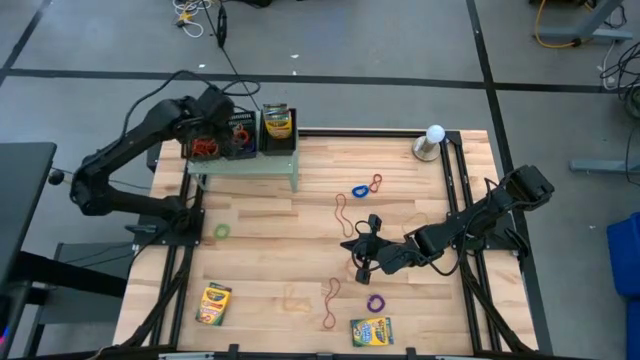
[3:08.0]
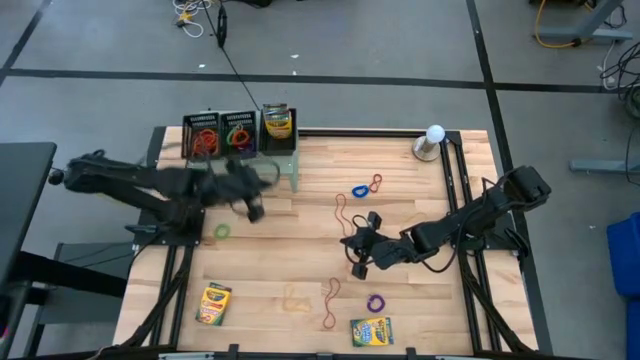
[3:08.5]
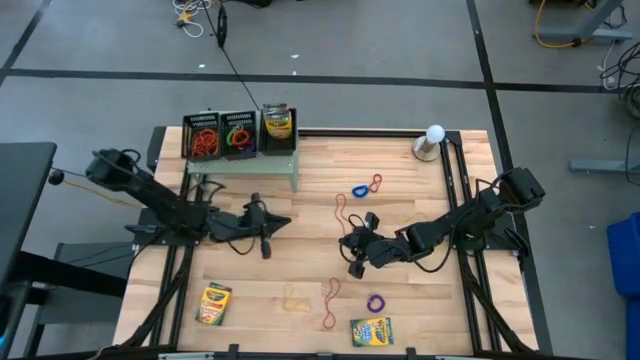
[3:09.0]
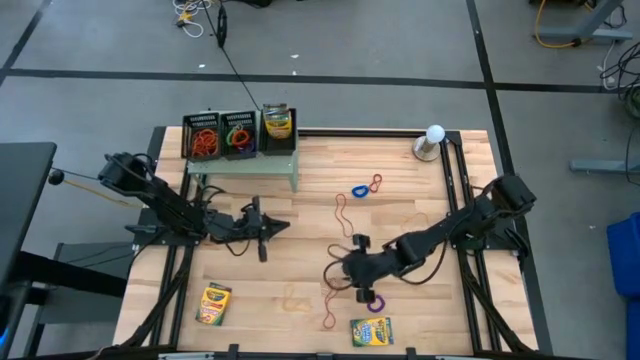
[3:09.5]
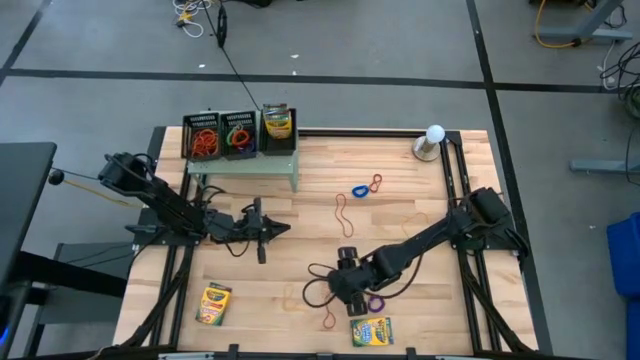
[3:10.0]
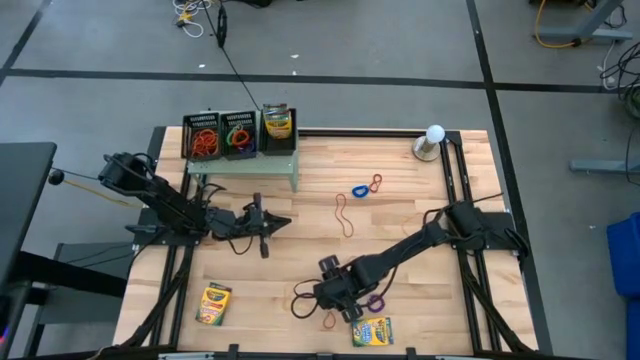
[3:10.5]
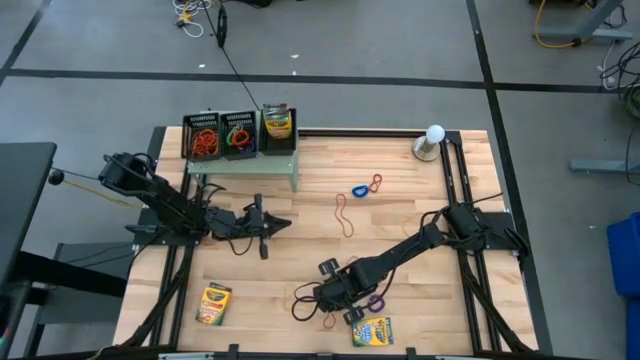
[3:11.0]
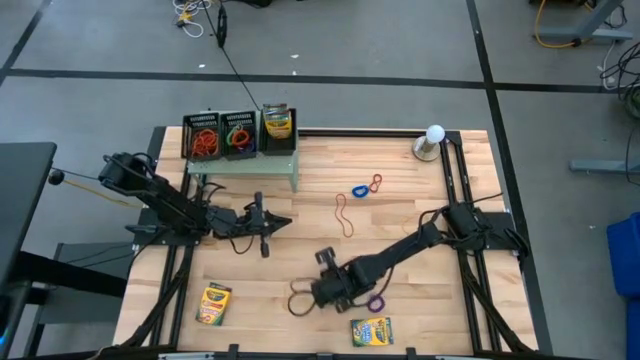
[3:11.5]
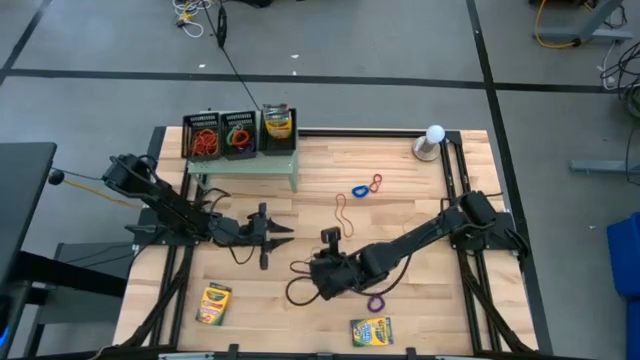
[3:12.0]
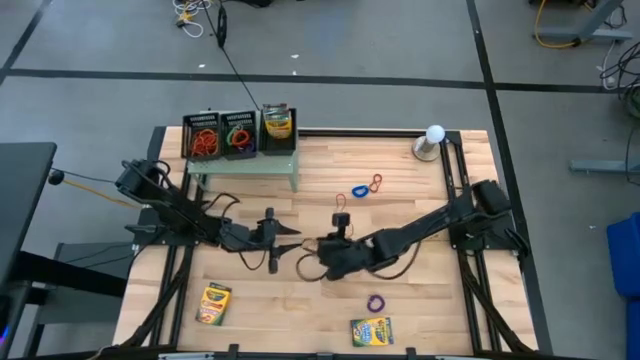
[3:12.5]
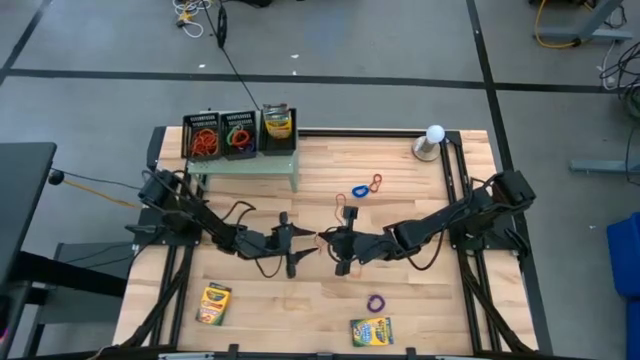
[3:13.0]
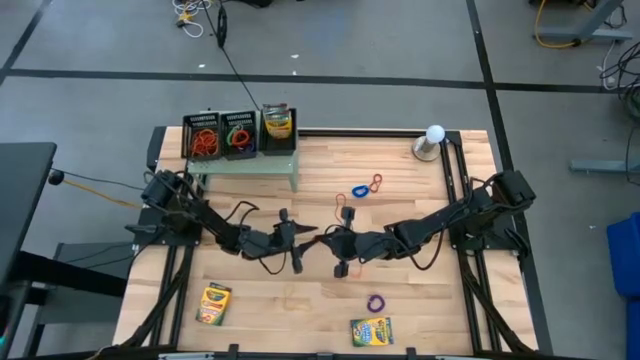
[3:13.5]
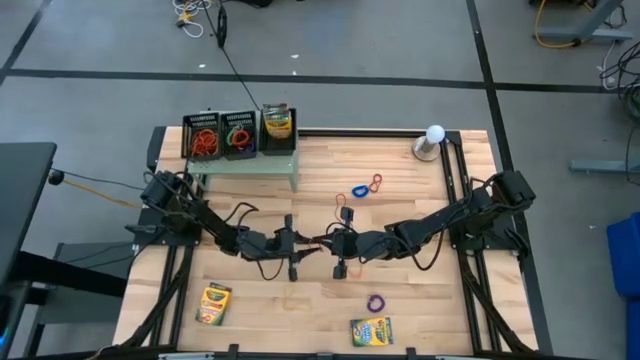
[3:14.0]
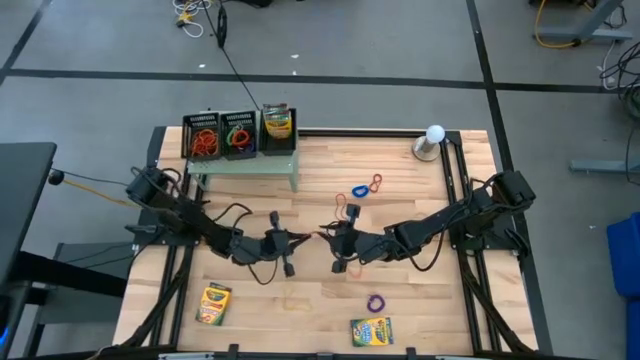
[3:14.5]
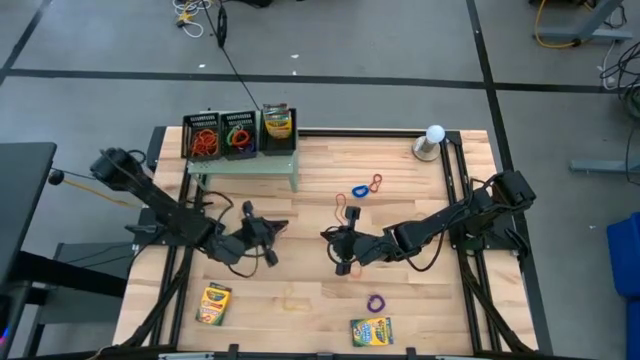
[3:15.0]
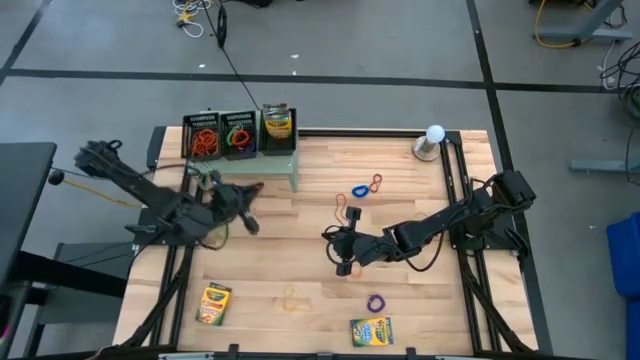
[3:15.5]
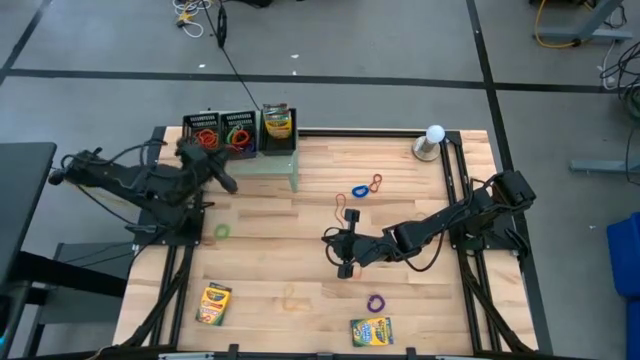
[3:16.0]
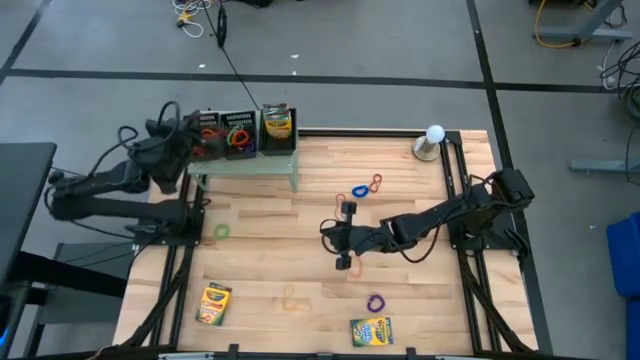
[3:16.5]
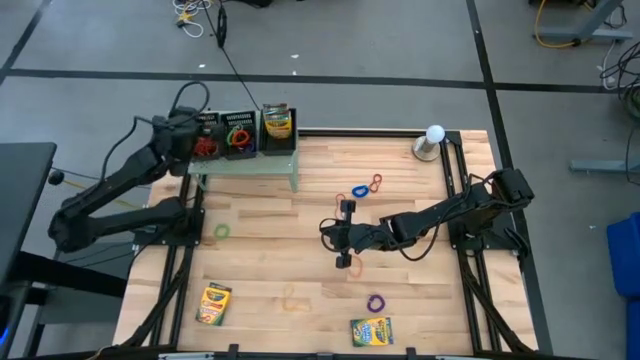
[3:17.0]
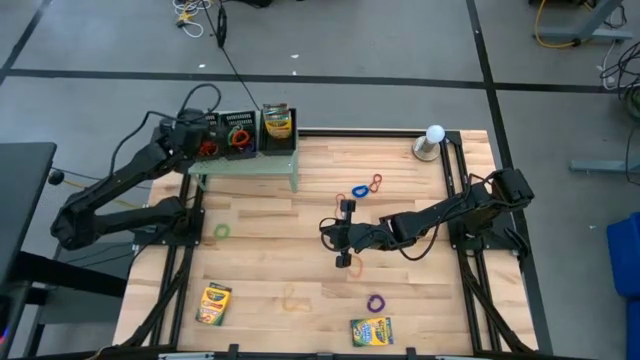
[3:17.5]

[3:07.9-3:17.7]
Task: Pick & Place Office Desk Supplies
Put the red rubber band into the left black bin on the shelf

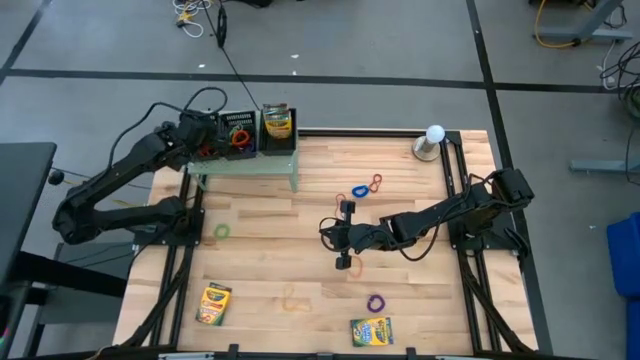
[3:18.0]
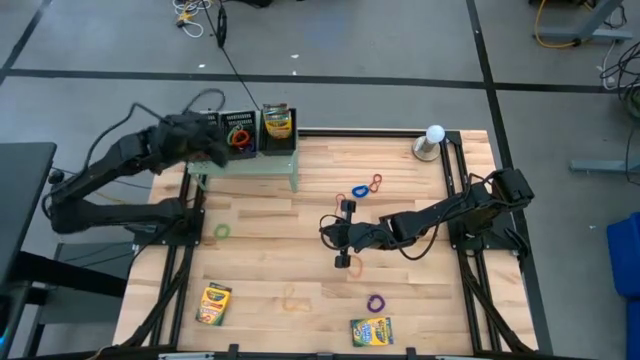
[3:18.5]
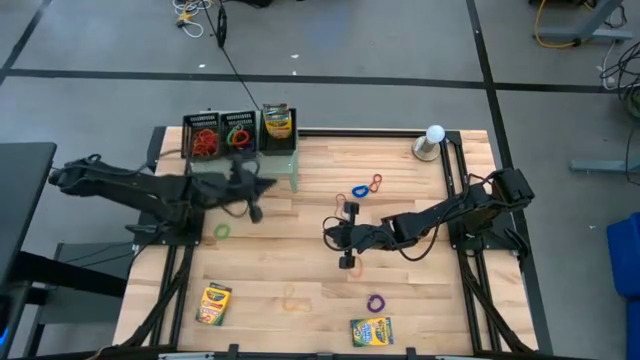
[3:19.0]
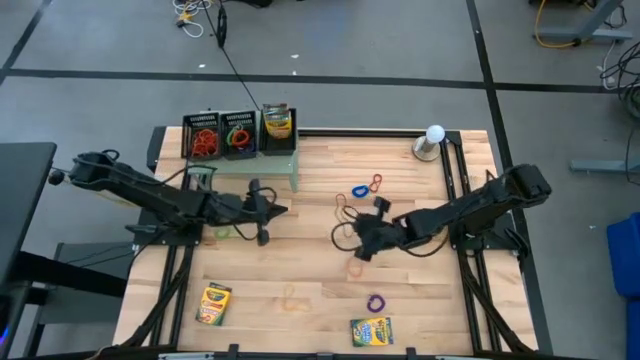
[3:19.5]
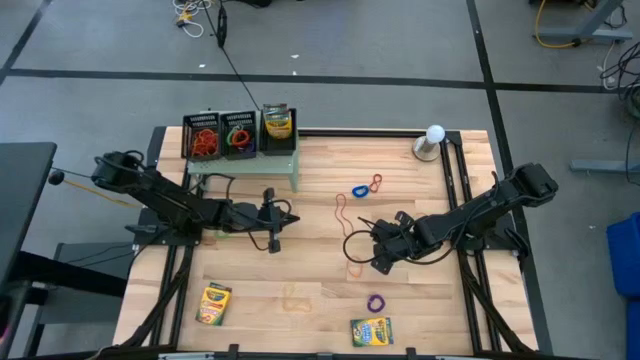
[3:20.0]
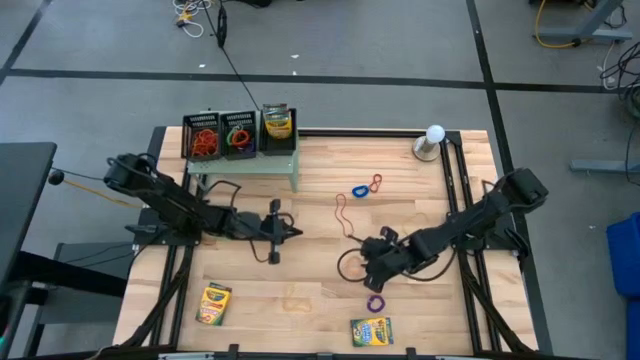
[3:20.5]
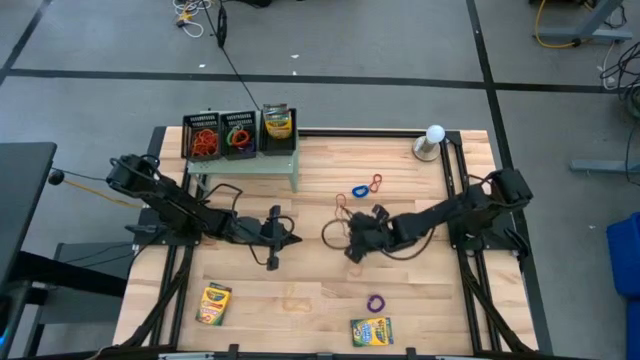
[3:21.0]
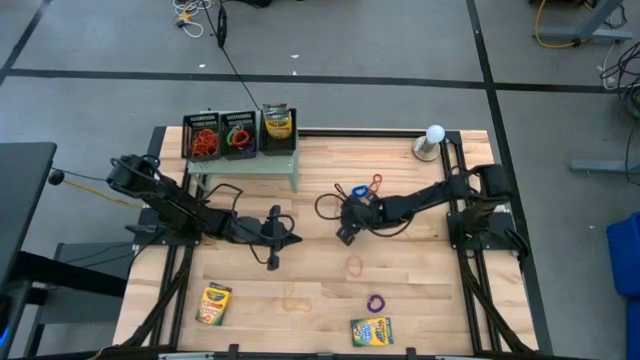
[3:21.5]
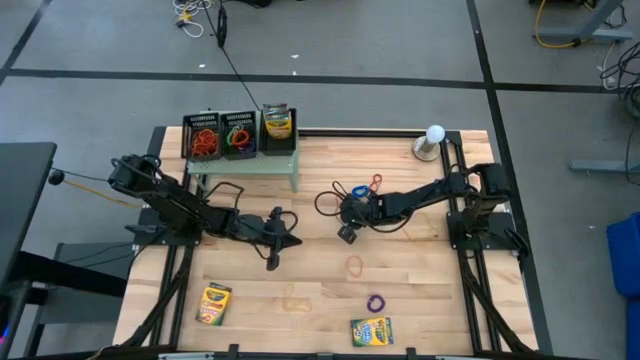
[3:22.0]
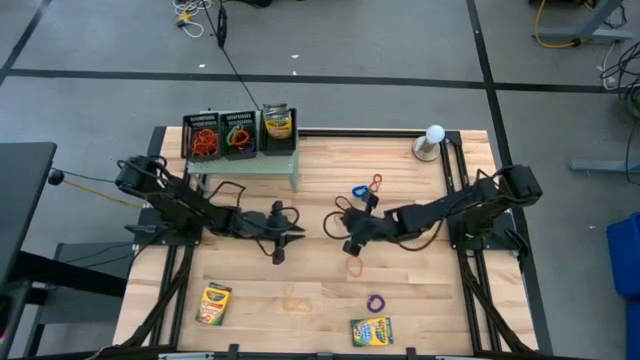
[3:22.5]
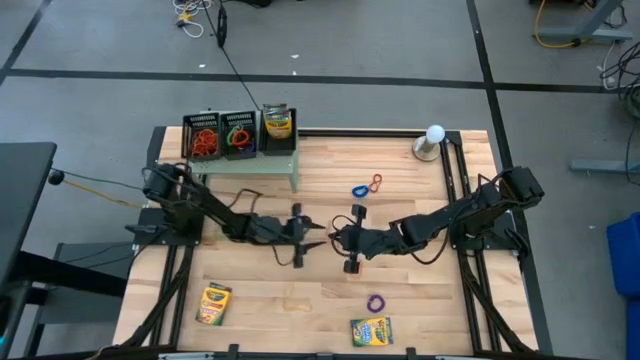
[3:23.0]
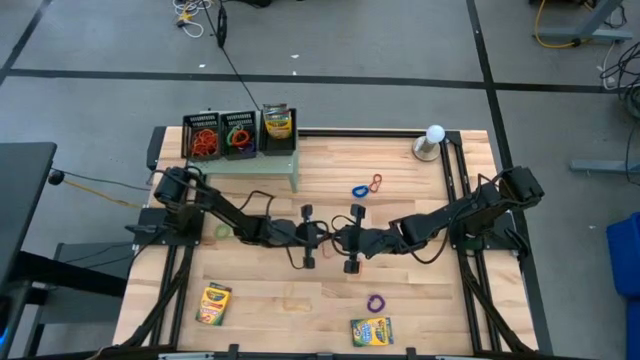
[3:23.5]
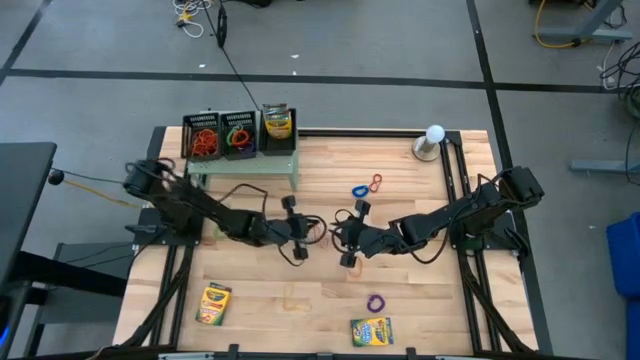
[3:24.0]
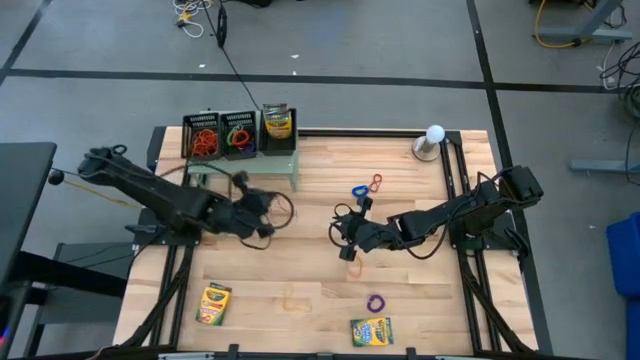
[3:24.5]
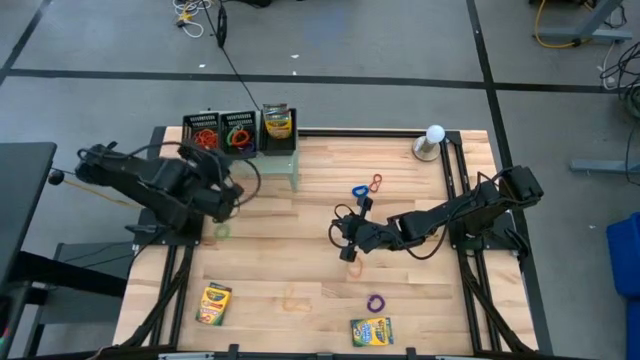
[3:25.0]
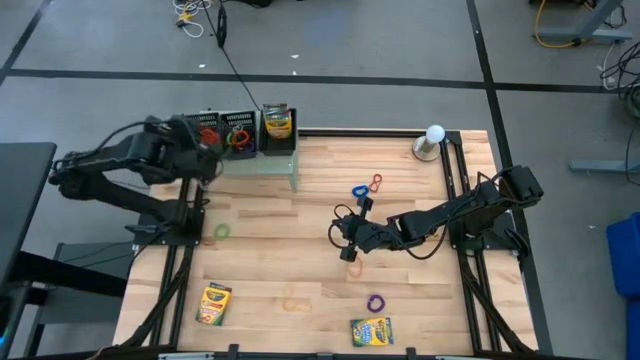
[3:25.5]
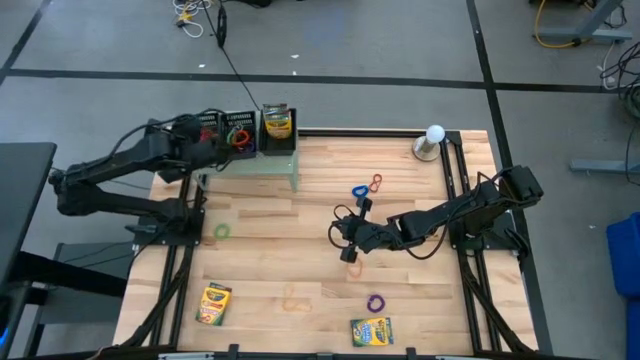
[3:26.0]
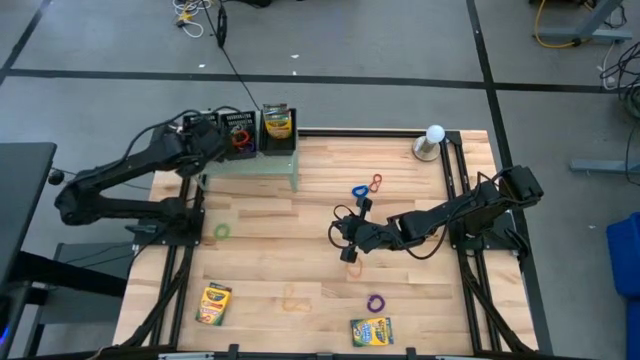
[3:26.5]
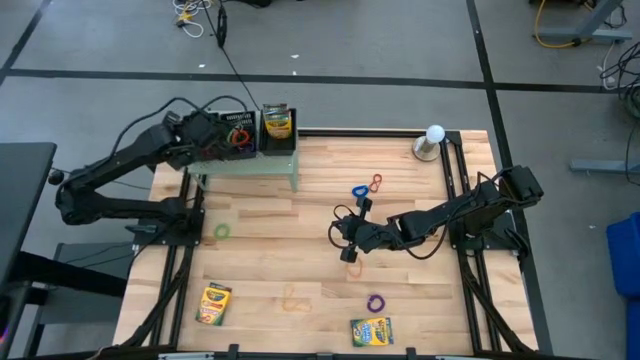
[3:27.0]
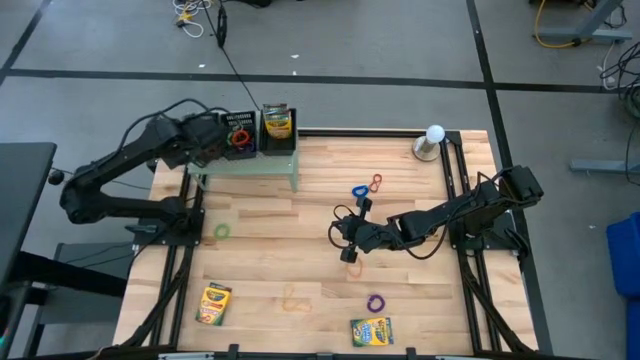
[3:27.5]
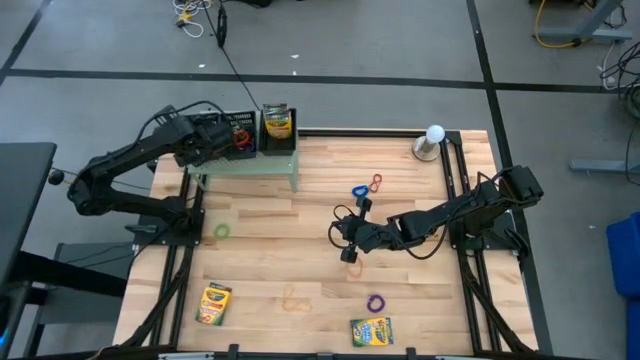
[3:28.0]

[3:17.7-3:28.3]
Put the red rubber band into the left black bin on the shelf

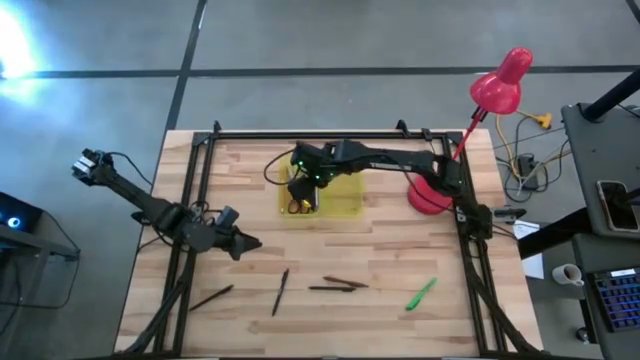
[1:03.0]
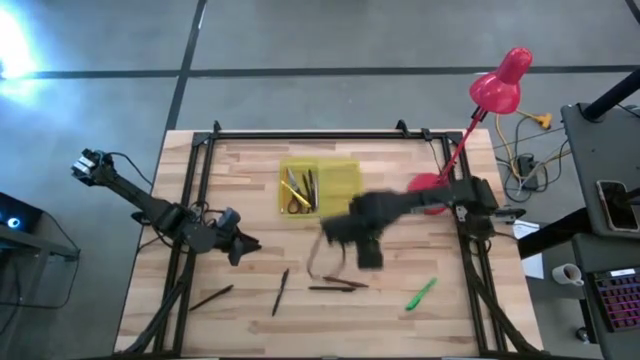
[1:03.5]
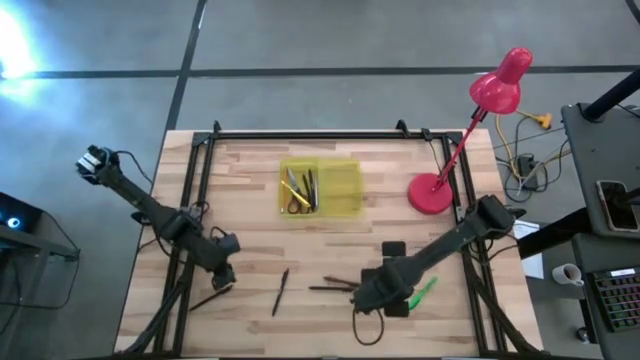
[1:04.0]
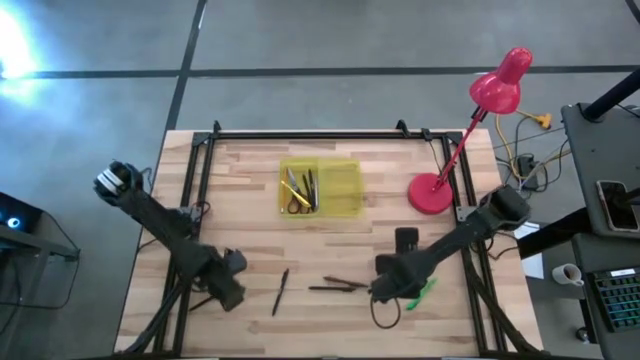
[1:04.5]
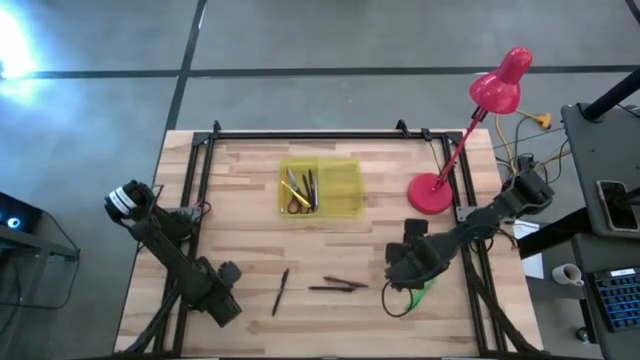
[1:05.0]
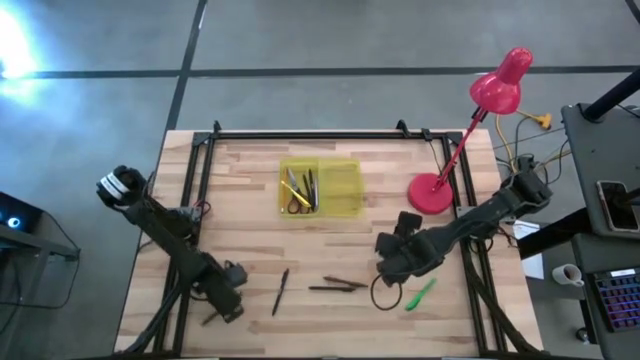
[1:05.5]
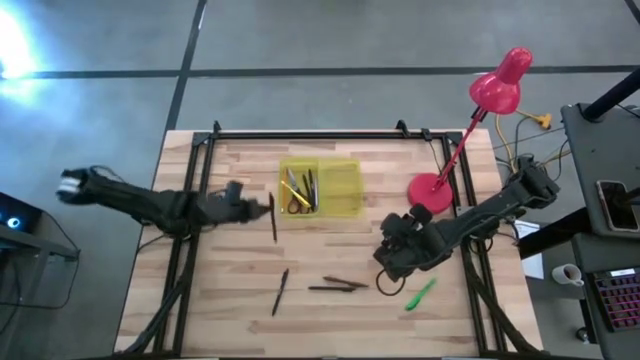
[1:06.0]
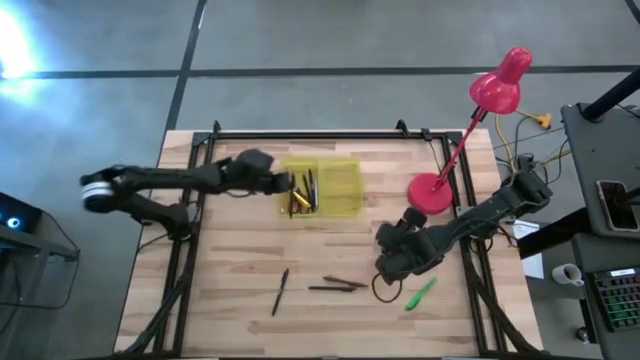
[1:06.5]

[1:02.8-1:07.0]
Task: Pick & place school supplies into a supply box
Put the black pen into the supply box
